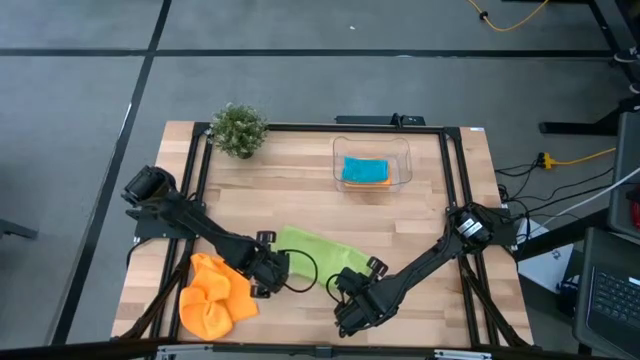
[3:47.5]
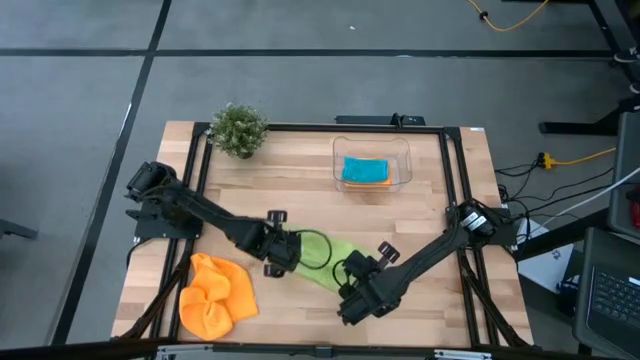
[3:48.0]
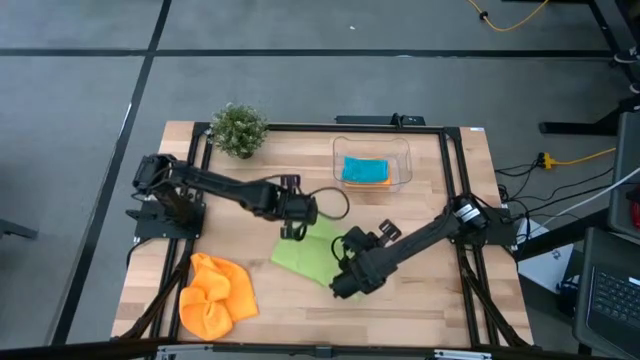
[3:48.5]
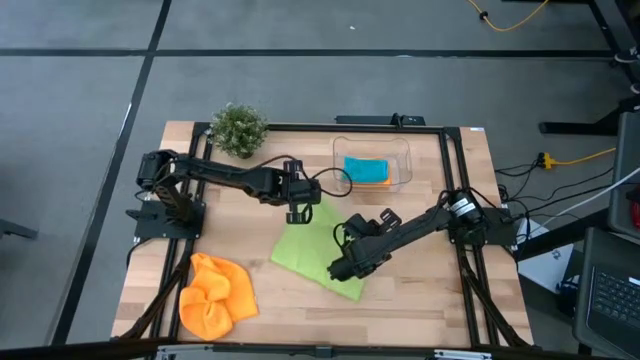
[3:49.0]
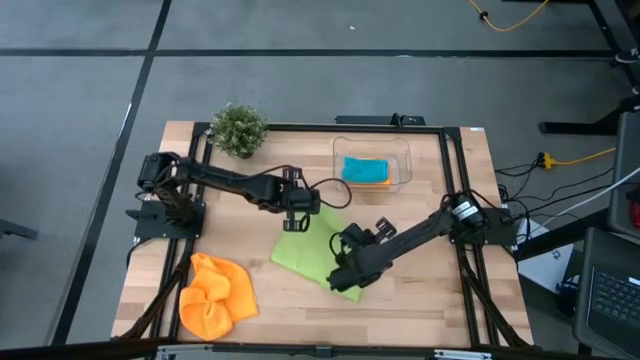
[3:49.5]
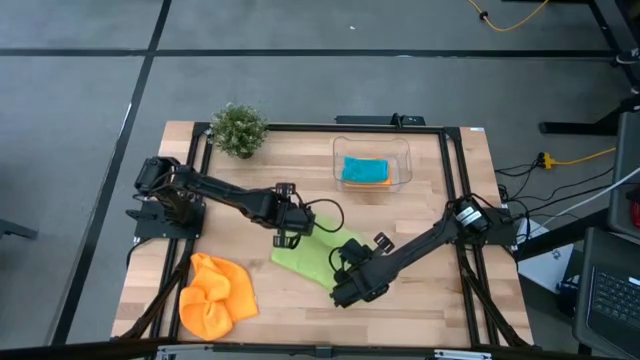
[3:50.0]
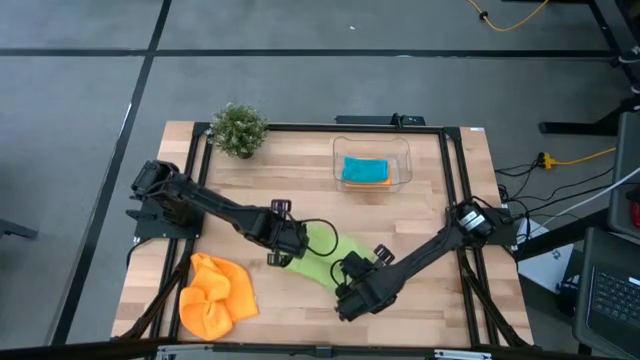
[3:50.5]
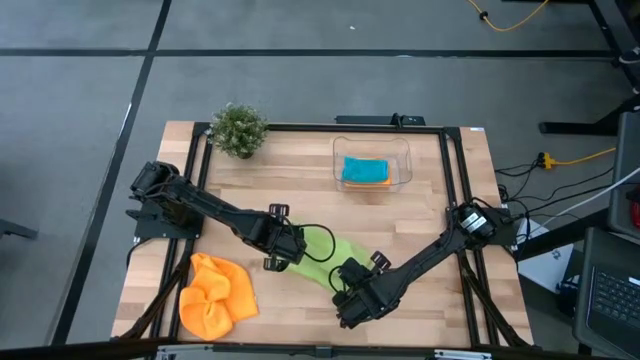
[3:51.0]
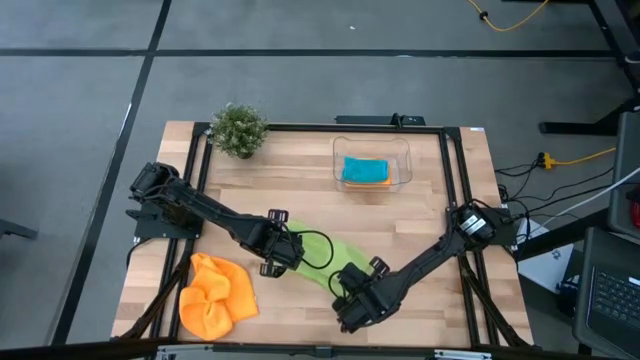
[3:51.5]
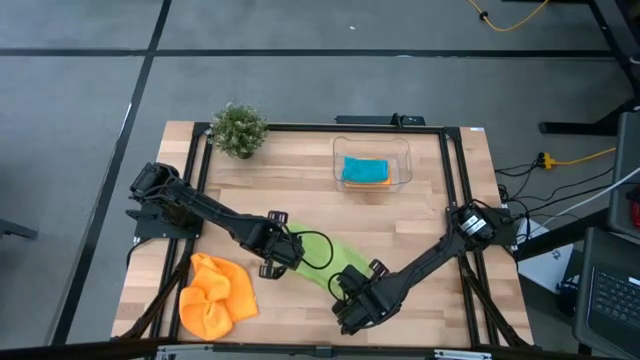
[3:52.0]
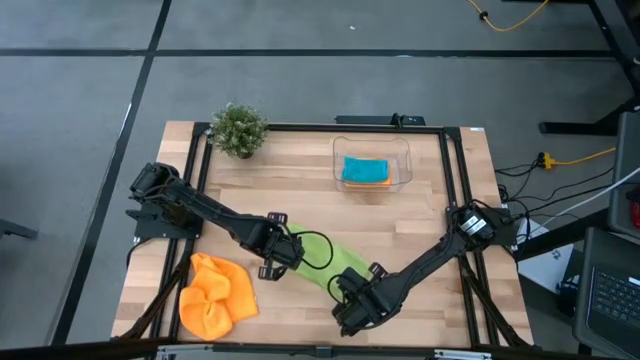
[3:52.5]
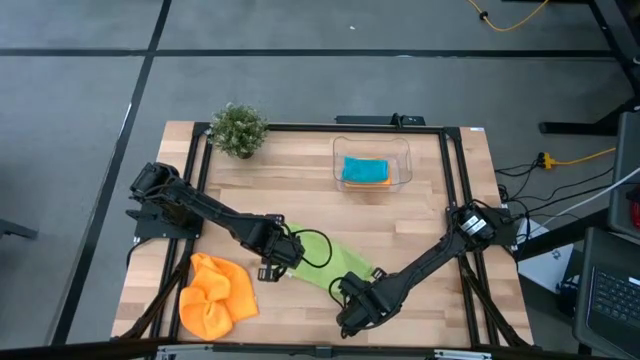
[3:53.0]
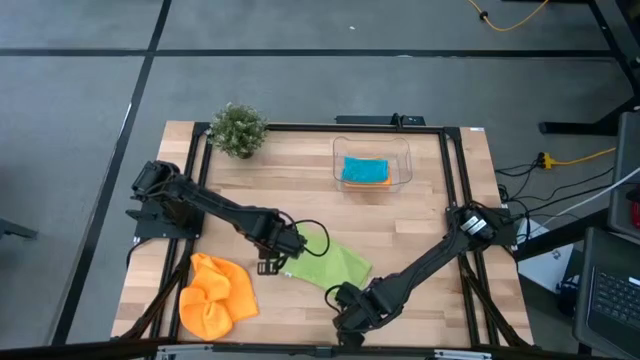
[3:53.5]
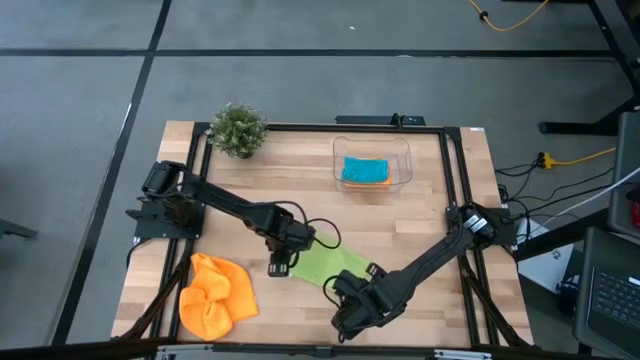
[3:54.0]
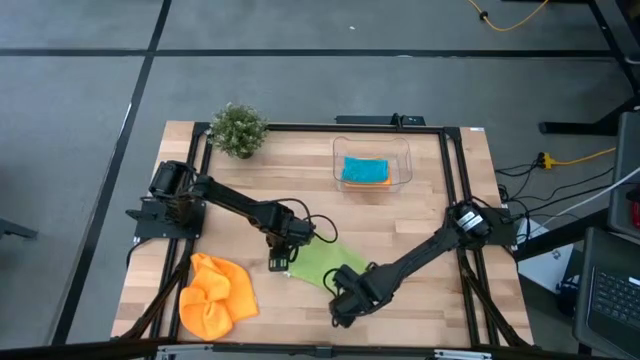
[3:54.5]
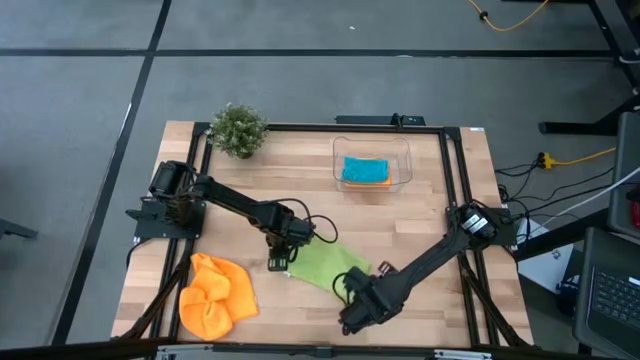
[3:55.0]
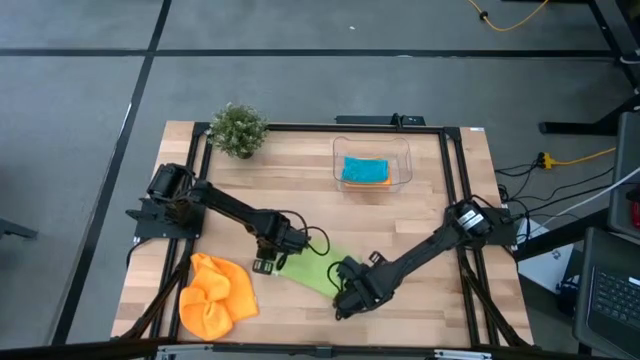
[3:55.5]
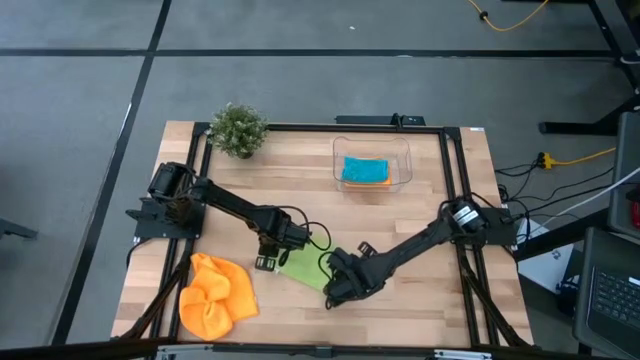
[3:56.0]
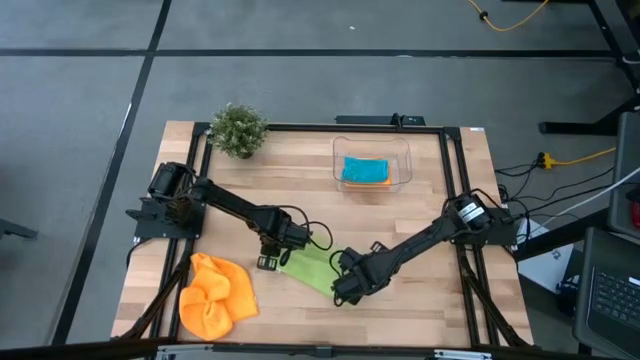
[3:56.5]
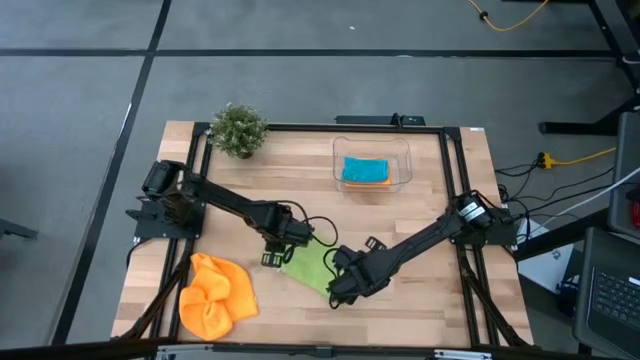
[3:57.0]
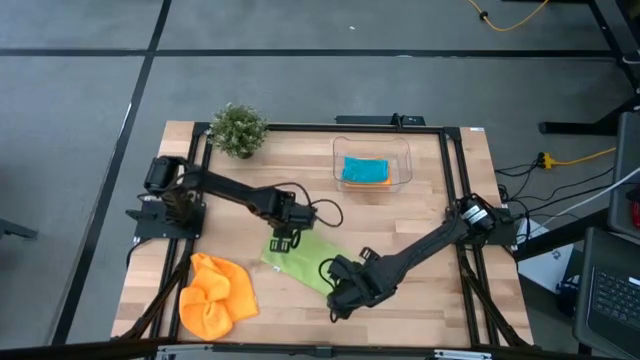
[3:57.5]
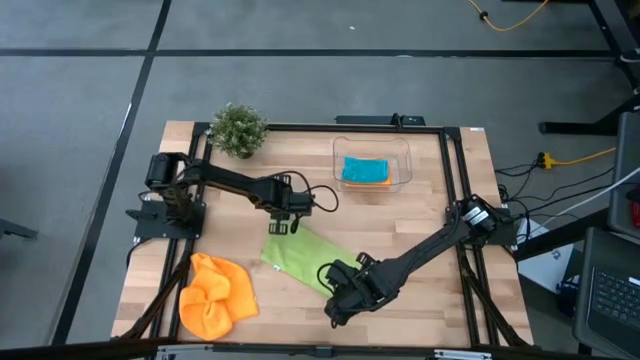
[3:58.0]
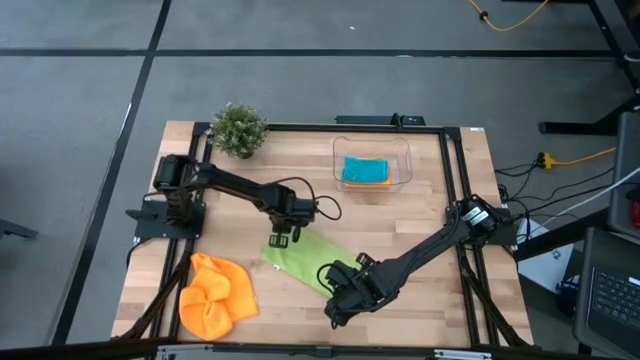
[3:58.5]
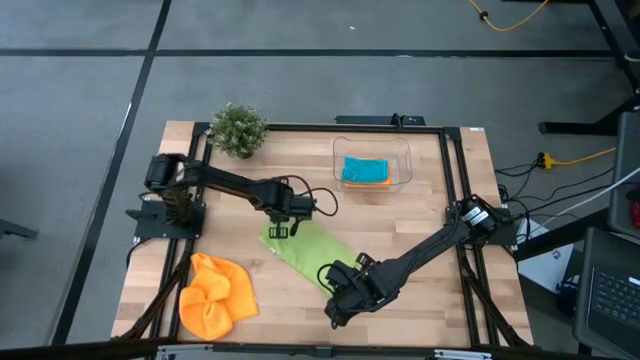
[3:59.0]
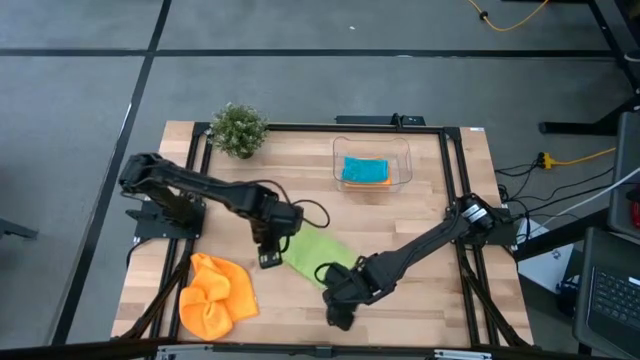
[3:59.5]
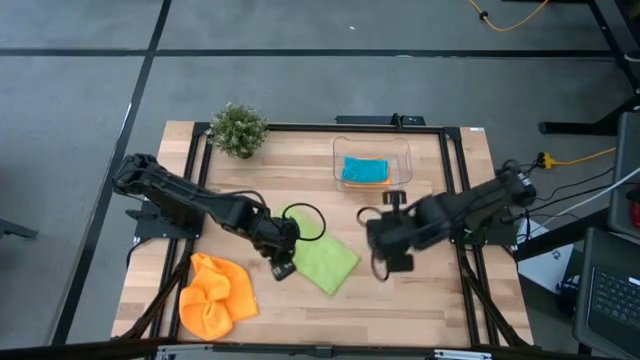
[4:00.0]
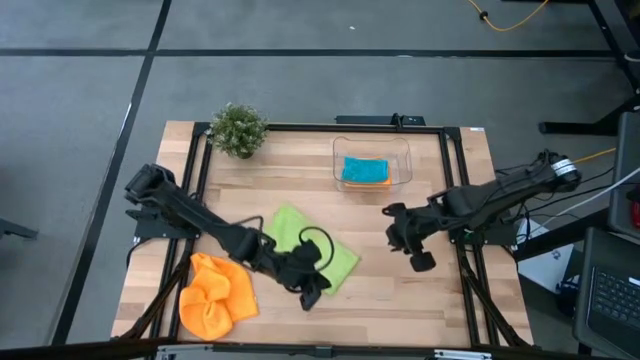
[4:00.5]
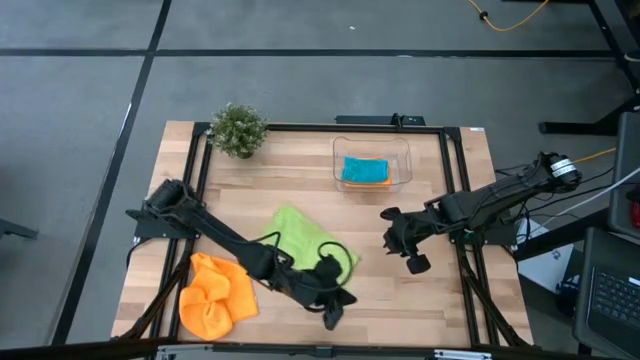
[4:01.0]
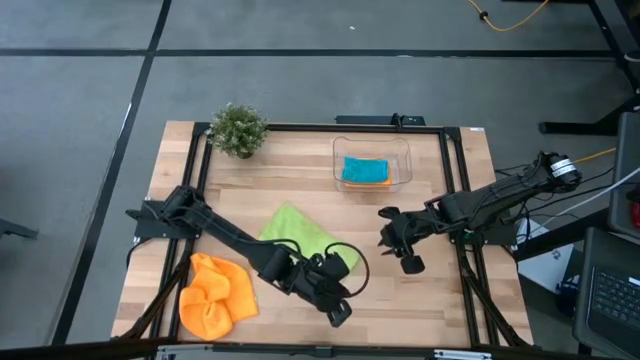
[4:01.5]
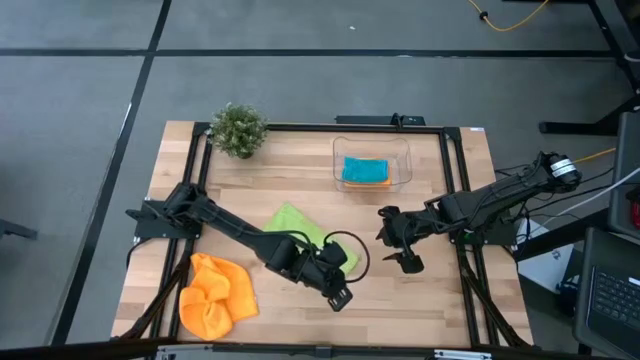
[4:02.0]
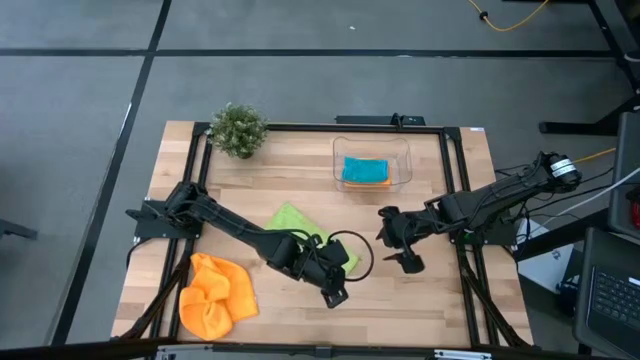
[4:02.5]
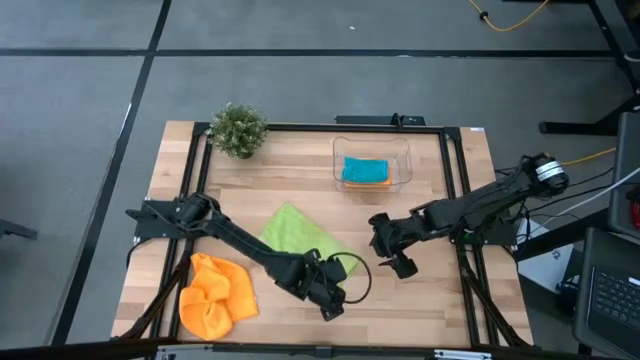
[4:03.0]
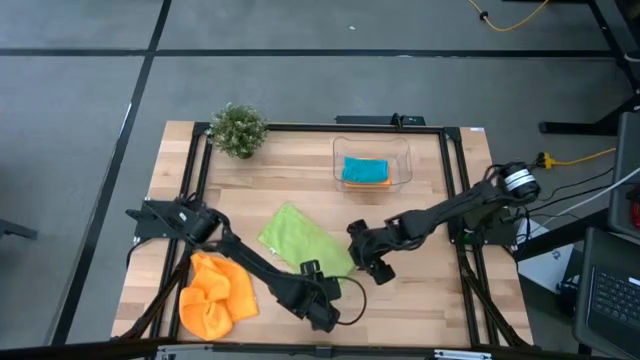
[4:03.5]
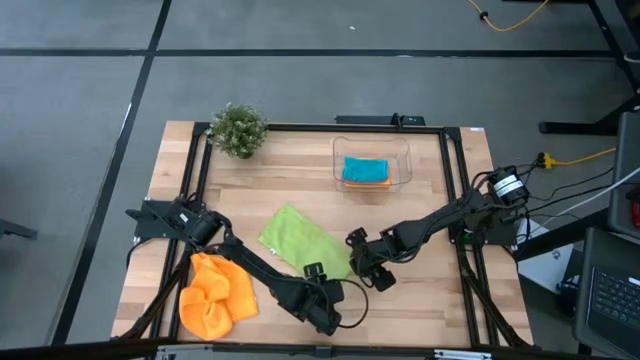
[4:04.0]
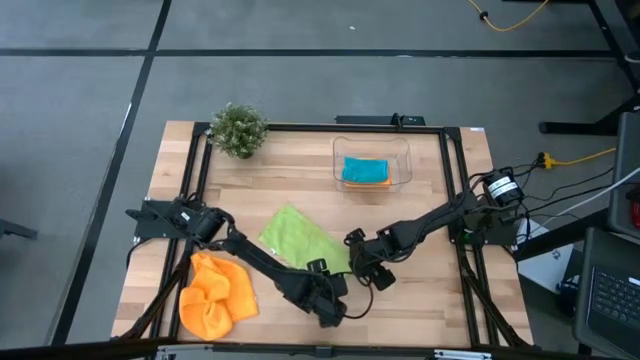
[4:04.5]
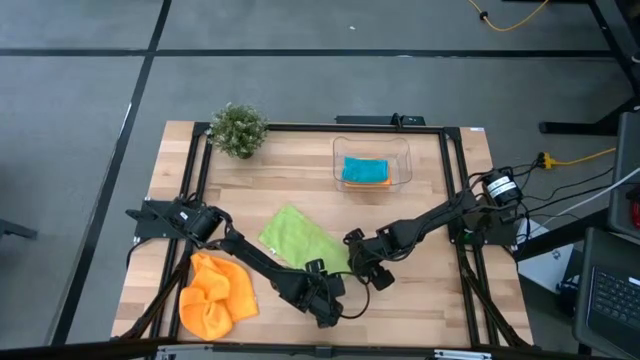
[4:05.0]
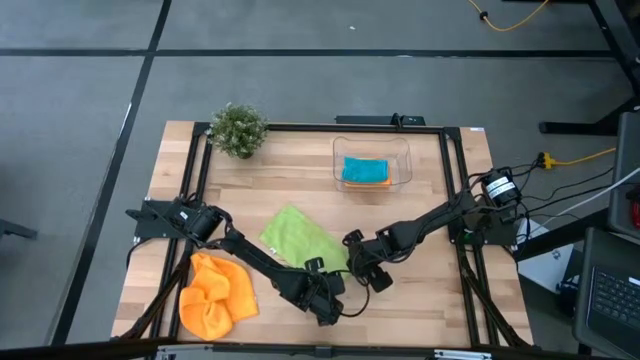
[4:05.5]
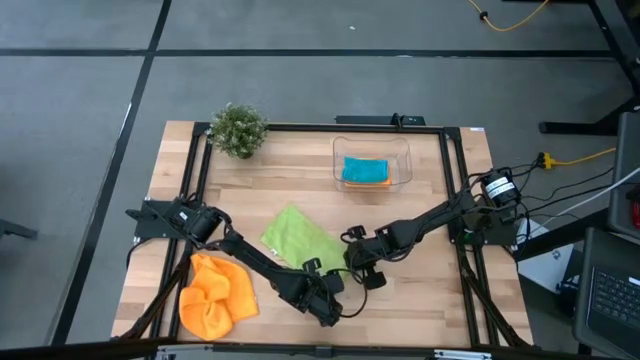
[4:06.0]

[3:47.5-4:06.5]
Task: Fold microfiber towels
Fold the green microfiber cloth
